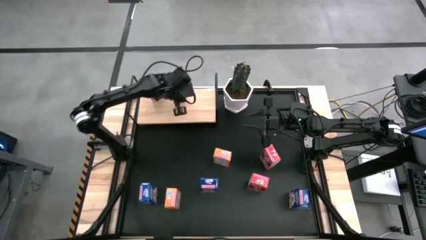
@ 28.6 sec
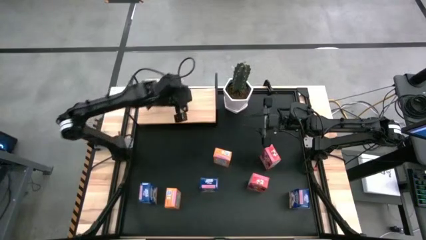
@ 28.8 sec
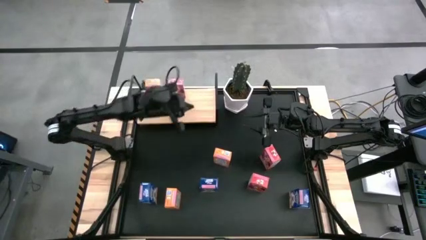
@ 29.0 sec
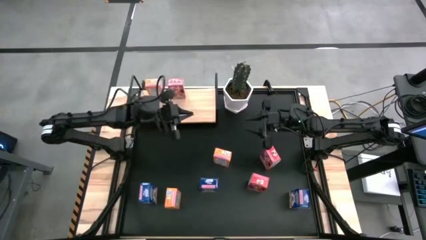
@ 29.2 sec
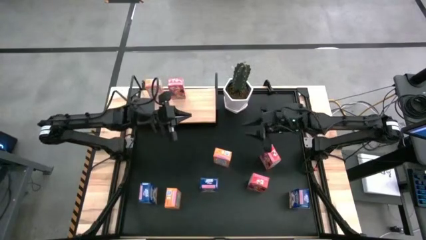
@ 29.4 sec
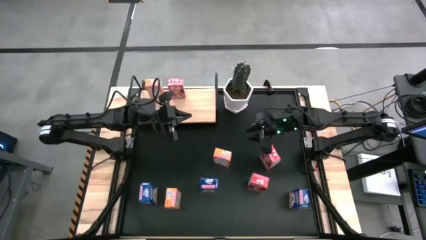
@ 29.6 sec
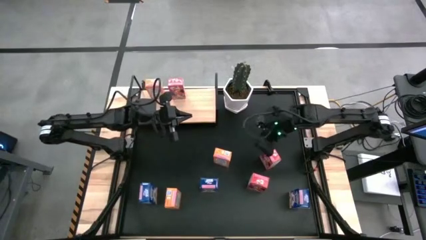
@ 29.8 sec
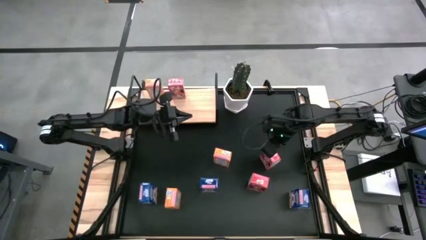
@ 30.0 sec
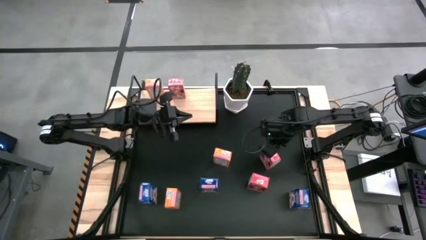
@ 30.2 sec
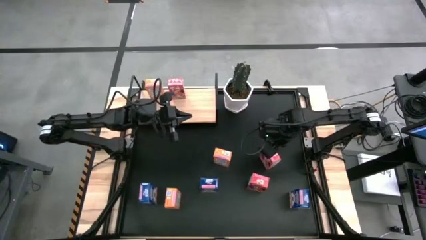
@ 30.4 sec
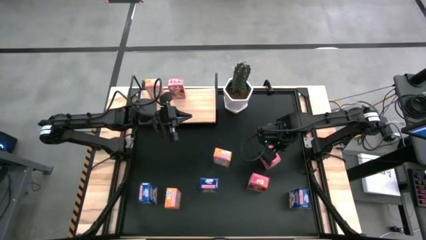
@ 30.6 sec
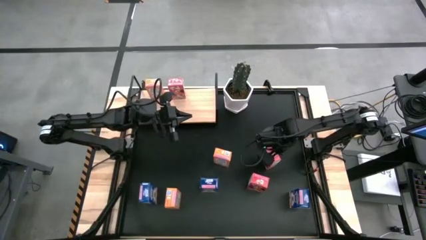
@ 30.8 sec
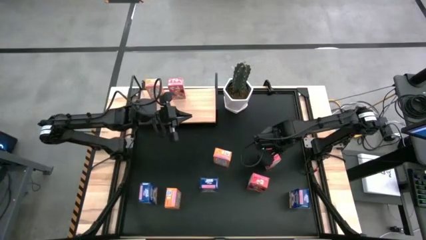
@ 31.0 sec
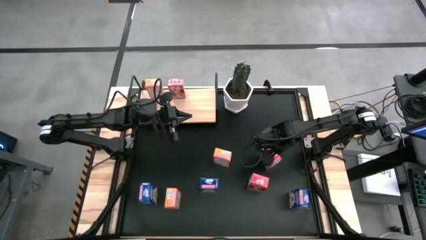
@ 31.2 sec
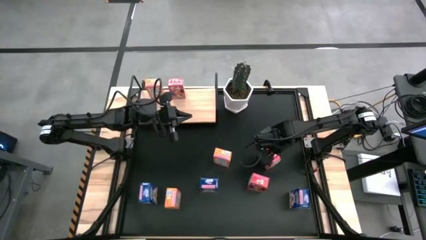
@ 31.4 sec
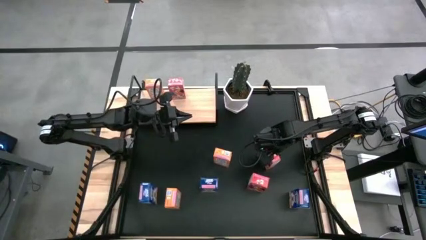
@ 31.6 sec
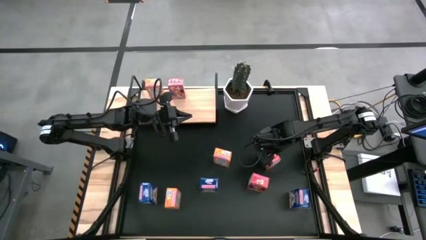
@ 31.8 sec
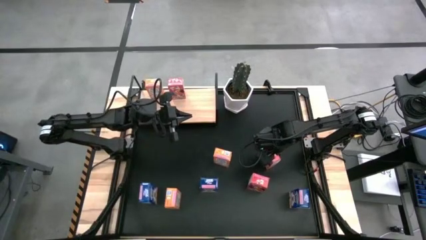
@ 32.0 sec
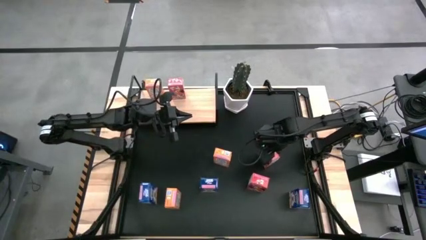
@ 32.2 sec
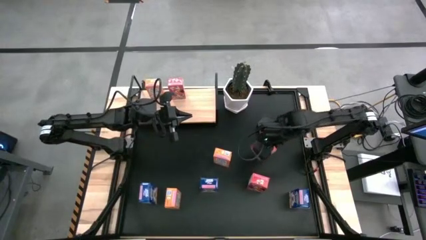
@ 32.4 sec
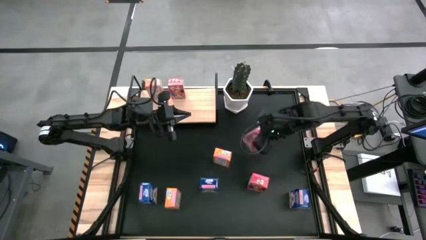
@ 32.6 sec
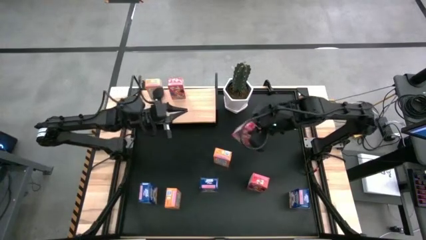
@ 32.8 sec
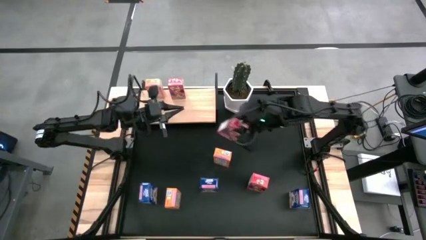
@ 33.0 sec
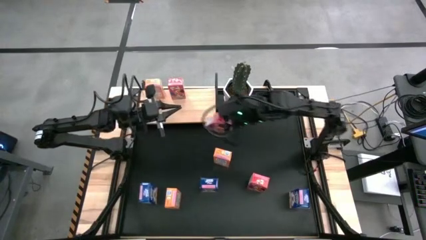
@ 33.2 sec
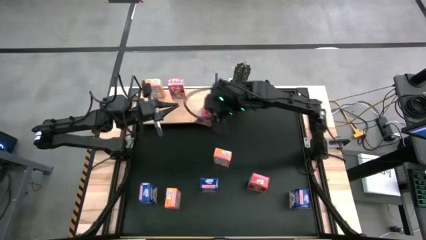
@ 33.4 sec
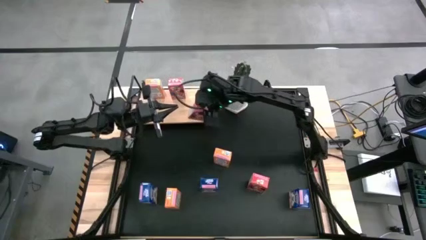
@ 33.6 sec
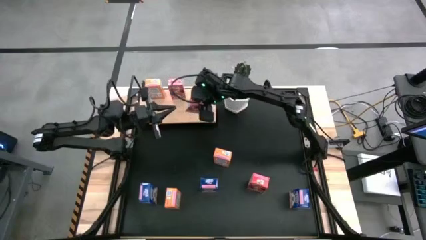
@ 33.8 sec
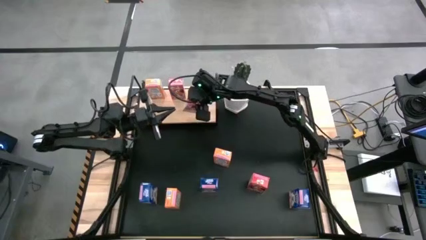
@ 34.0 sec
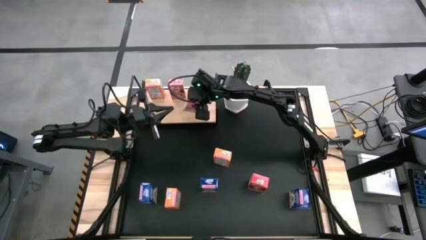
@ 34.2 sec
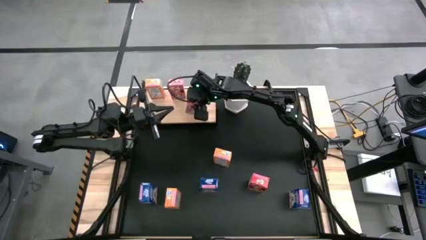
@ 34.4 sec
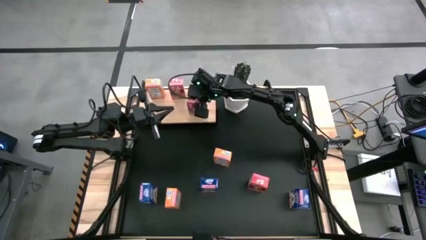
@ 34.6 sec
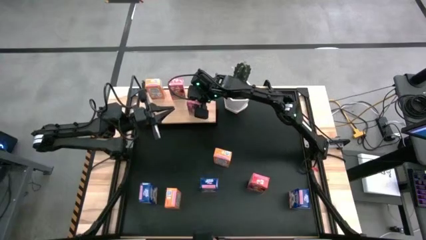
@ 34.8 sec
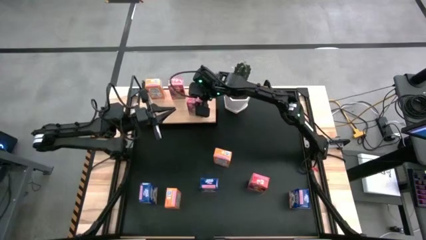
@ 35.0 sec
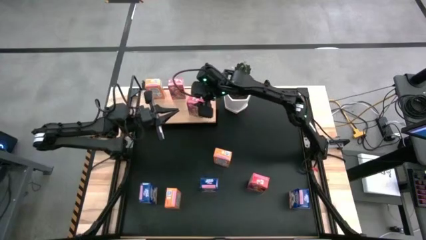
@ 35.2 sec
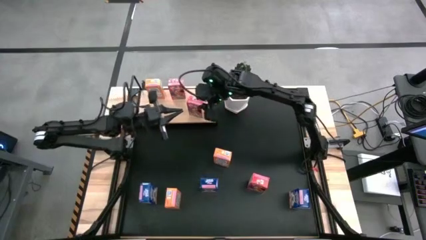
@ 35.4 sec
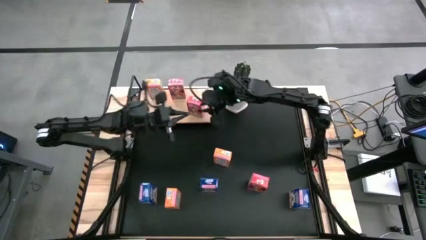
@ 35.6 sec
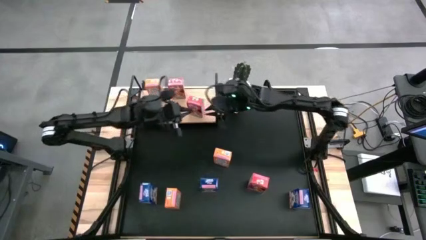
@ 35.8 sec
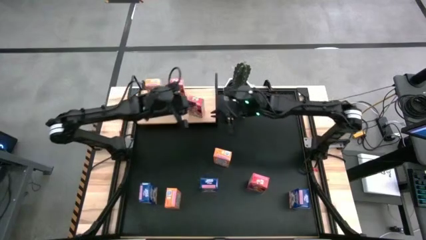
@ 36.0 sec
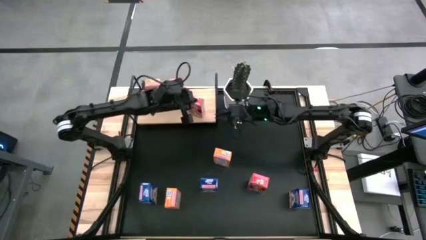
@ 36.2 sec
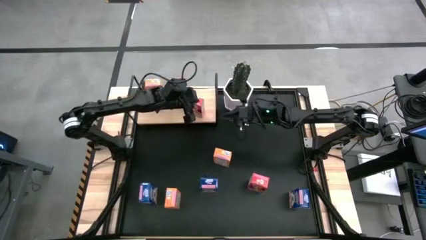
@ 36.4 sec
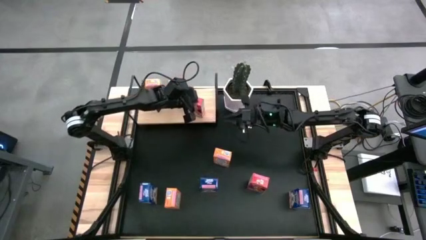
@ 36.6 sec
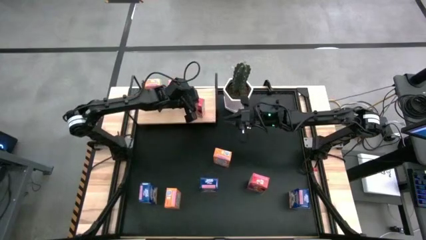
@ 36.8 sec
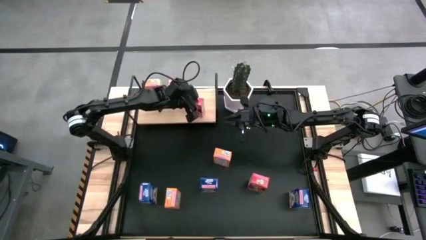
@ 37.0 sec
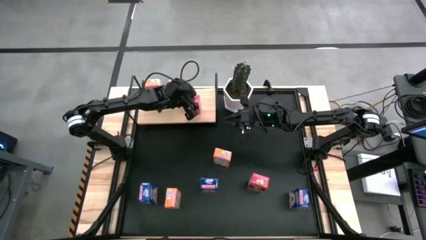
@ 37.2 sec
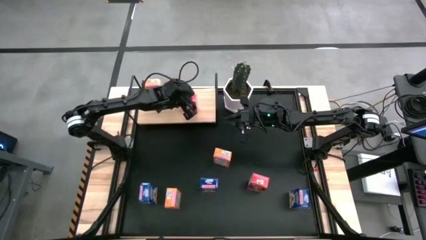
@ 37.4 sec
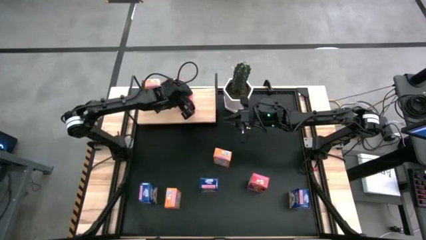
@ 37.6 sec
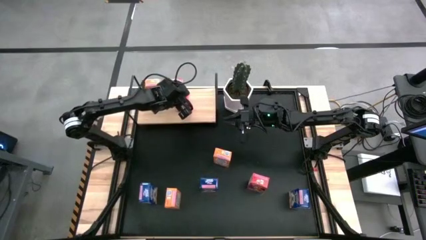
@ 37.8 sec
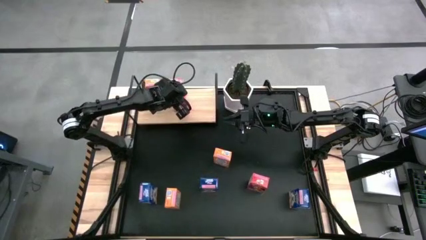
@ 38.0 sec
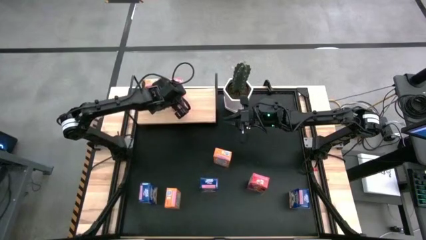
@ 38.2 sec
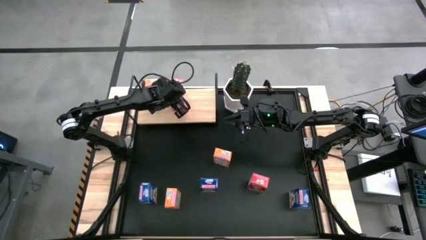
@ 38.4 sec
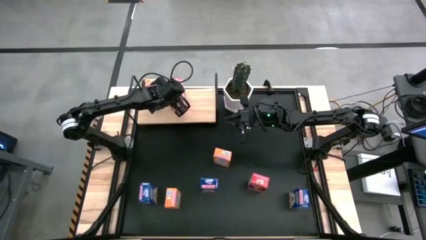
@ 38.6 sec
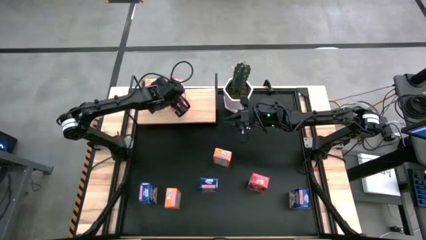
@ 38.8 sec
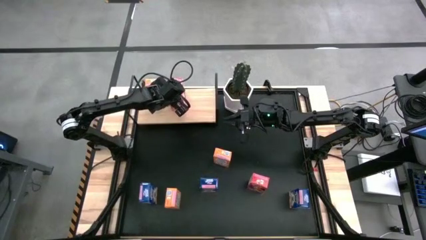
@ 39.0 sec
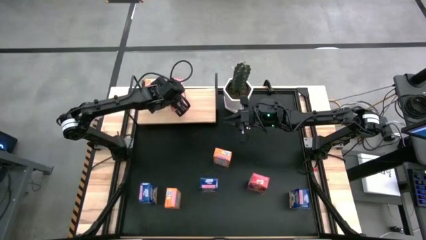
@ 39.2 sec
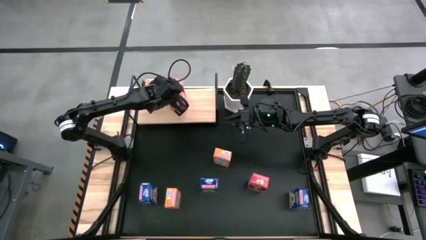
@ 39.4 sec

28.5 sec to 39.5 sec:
Task: Stack cereal on shelf
Put the top red cereal box on the shelf and align it with the other red cereal box

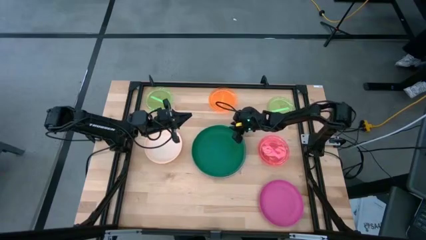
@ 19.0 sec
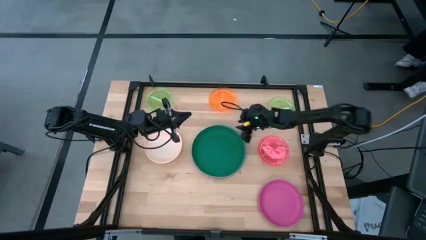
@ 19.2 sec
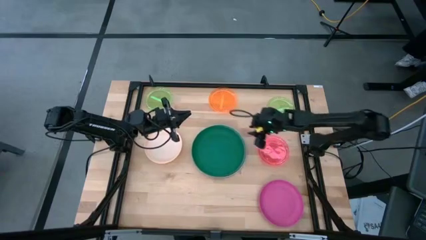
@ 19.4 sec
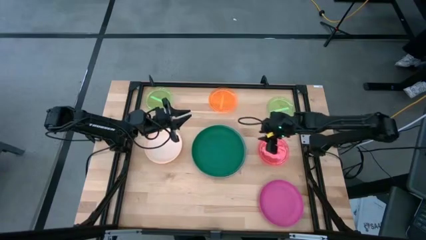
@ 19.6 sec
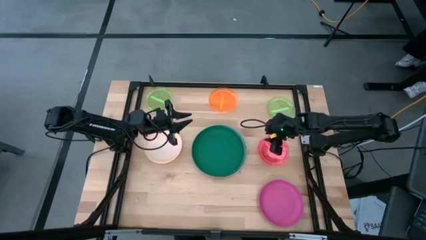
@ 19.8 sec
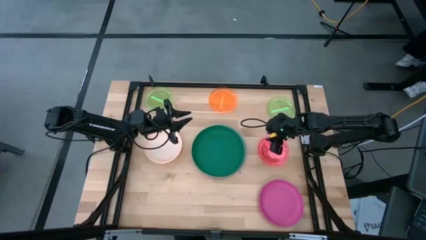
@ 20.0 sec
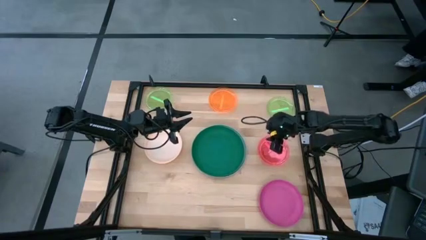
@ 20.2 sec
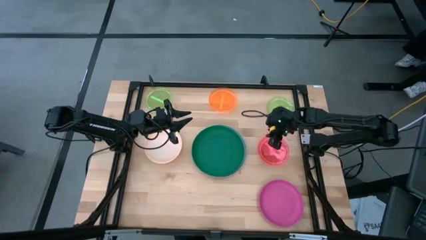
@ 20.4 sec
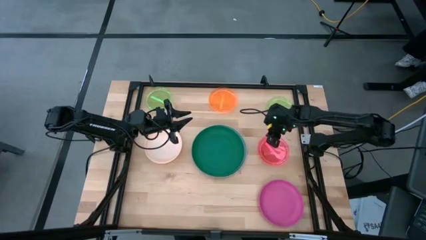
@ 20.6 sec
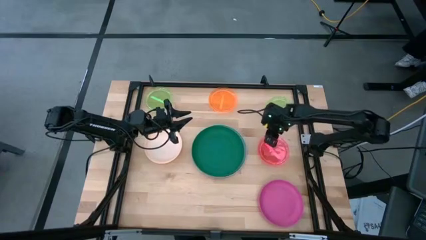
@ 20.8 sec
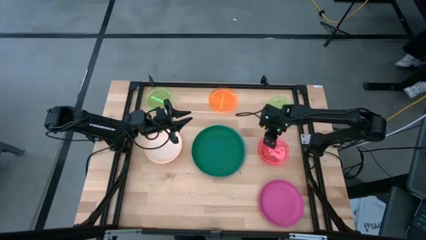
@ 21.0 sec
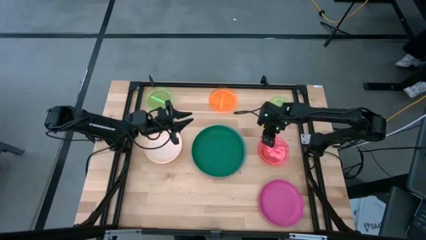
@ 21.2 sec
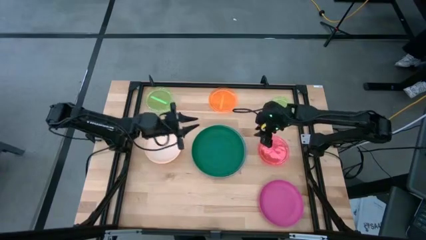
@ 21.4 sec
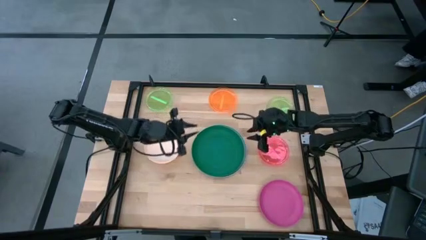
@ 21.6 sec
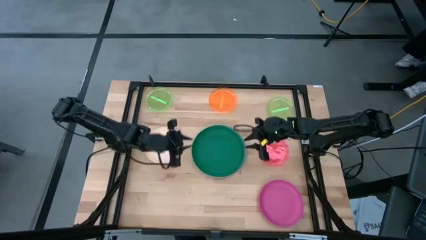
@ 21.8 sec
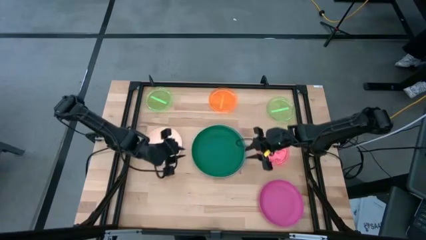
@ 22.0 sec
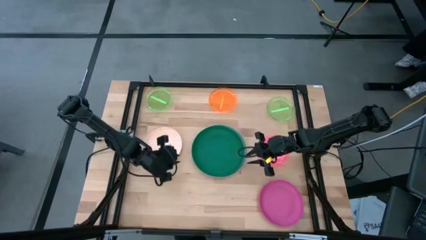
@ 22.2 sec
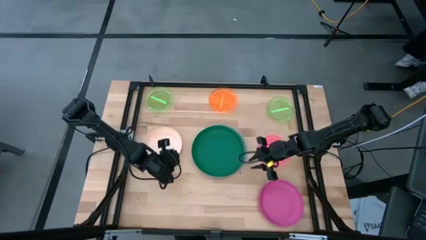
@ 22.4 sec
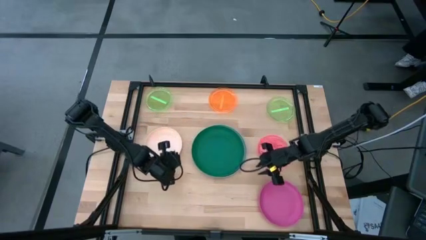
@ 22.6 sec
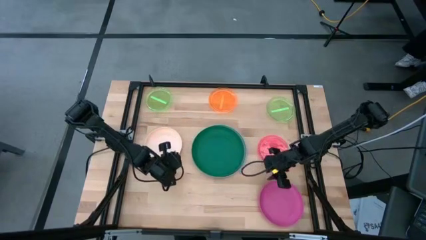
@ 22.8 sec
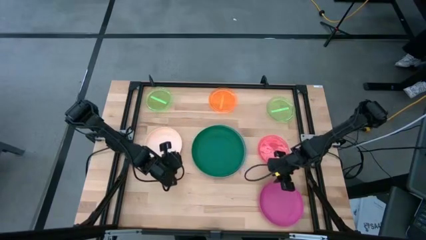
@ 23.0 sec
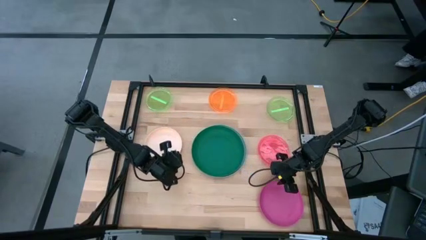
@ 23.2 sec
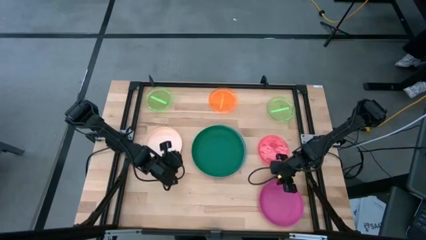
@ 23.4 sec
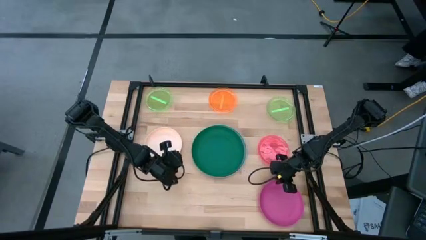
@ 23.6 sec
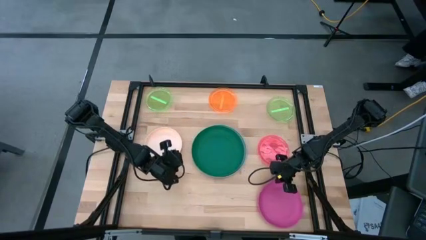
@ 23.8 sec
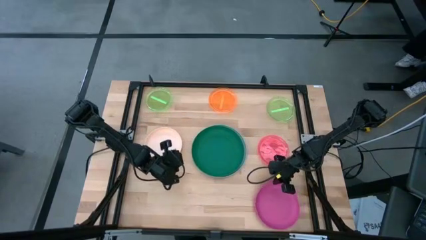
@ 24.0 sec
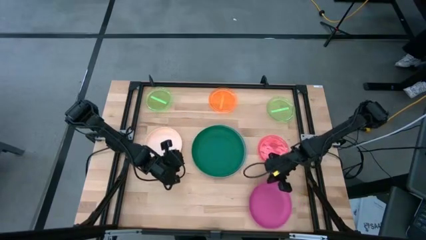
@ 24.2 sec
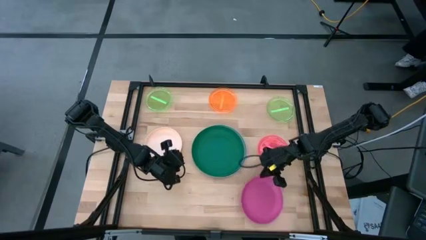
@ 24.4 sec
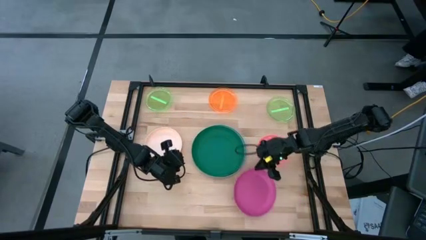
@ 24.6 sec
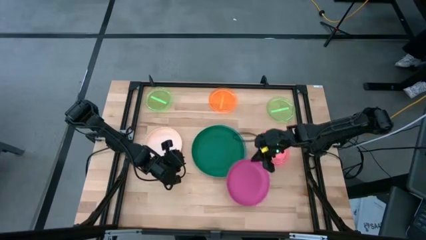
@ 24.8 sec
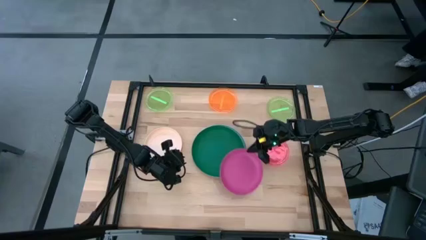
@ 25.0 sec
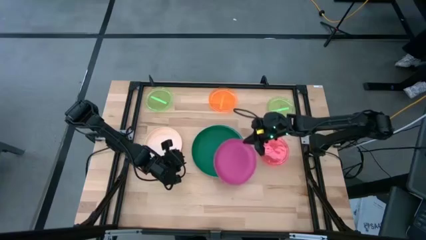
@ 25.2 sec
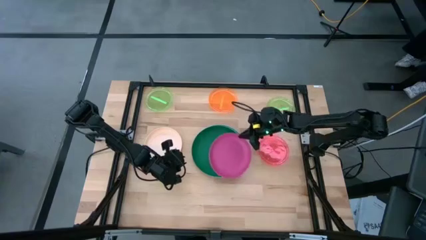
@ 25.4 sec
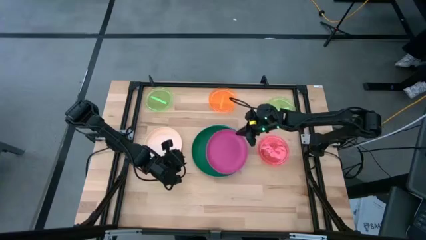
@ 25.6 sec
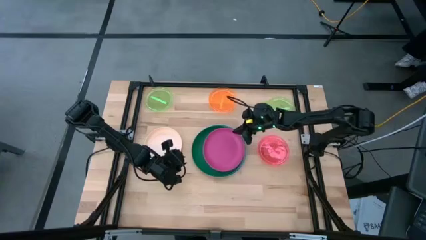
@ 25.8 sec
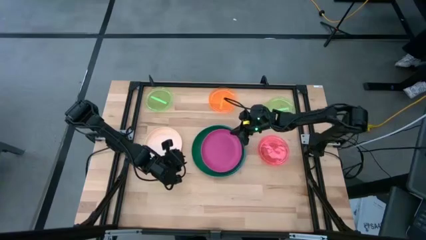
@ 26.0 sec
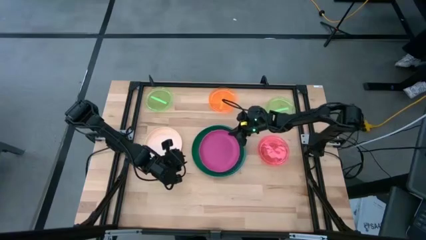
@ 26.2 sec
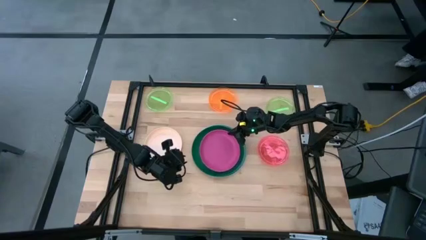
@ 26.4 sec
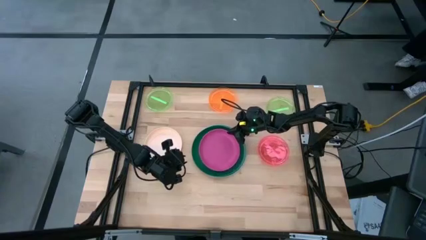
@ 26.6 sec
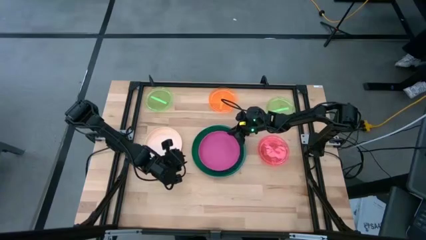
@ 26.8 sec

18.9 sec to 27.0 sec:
Task: Stack plastic plates
Stack the pink plate on top of the green plate
